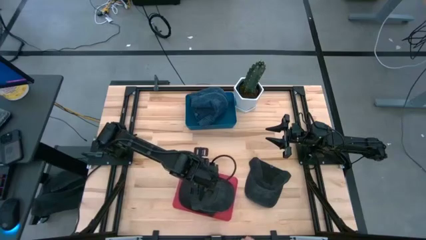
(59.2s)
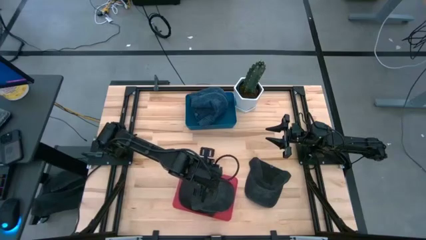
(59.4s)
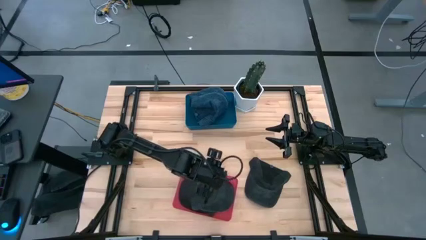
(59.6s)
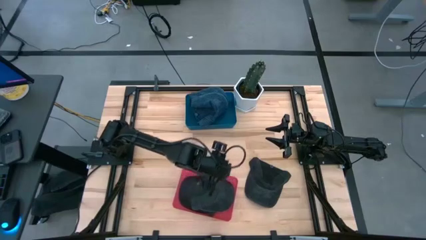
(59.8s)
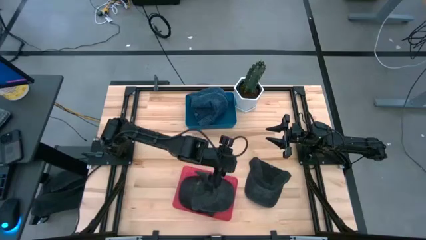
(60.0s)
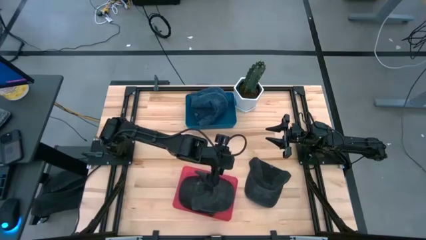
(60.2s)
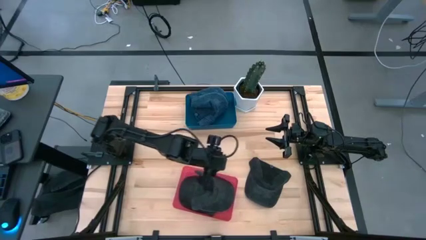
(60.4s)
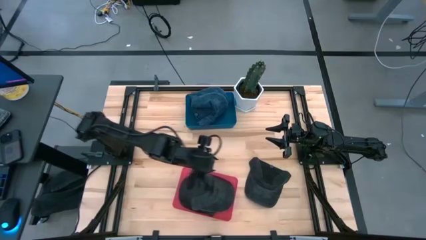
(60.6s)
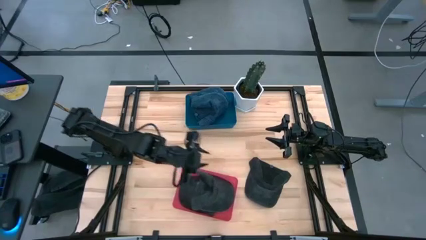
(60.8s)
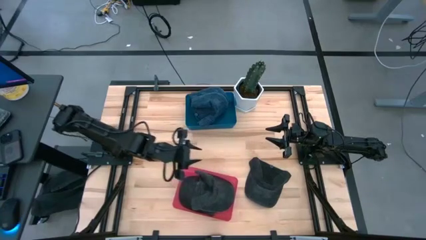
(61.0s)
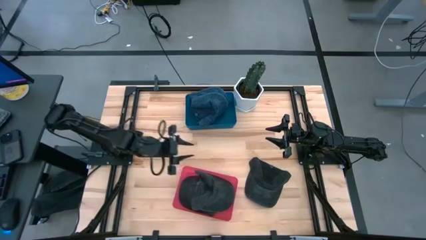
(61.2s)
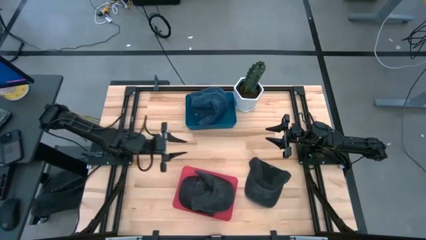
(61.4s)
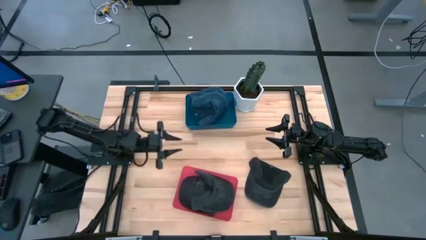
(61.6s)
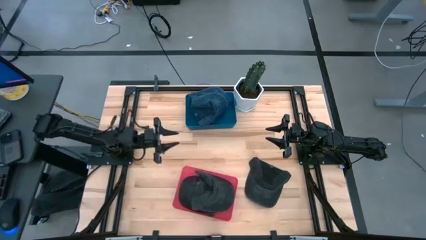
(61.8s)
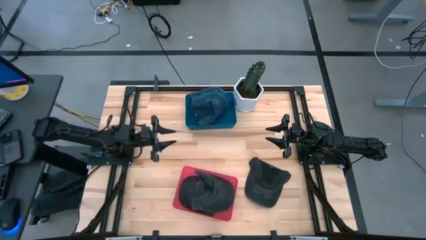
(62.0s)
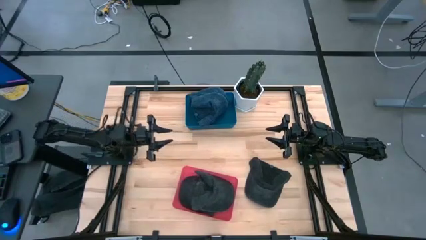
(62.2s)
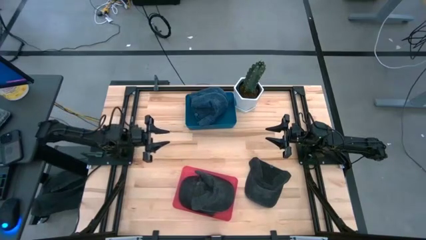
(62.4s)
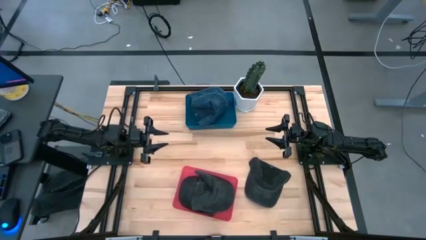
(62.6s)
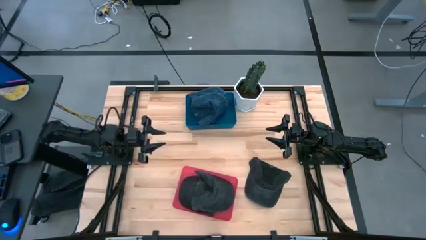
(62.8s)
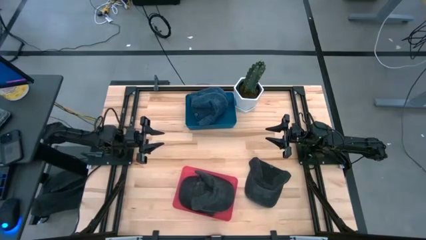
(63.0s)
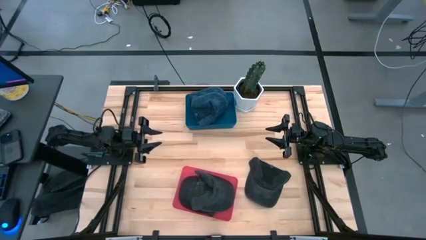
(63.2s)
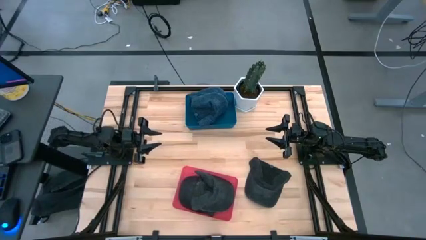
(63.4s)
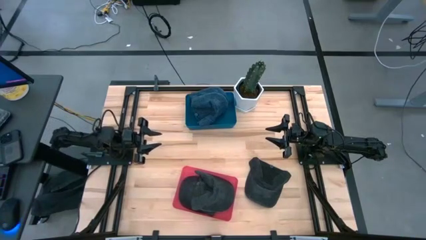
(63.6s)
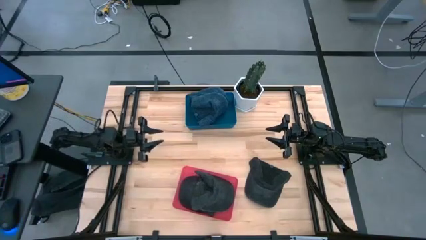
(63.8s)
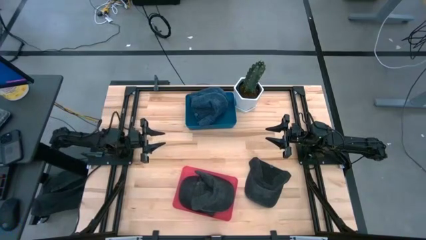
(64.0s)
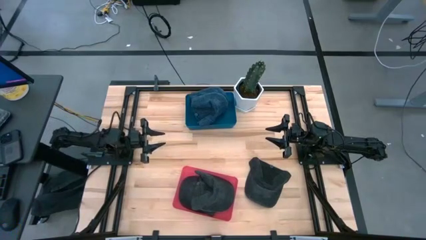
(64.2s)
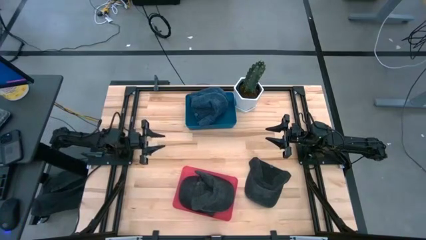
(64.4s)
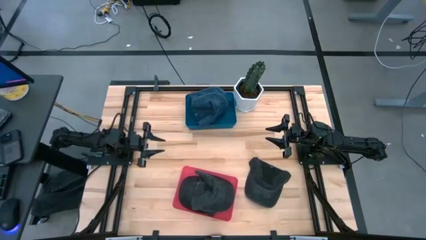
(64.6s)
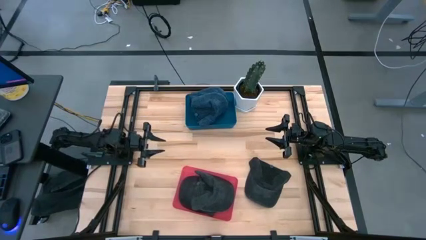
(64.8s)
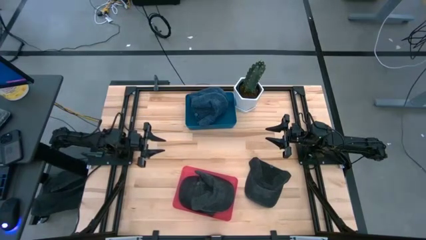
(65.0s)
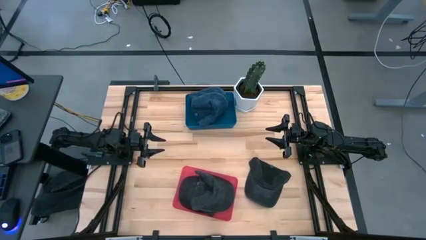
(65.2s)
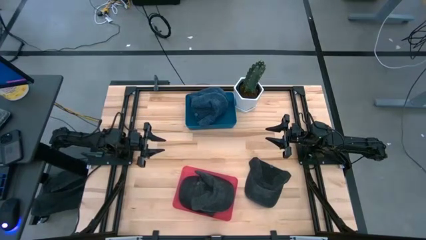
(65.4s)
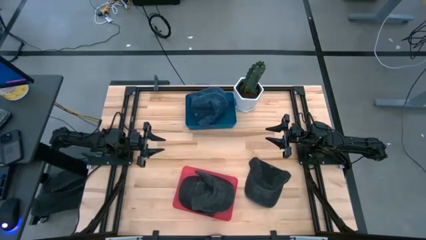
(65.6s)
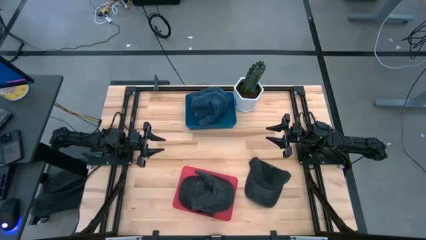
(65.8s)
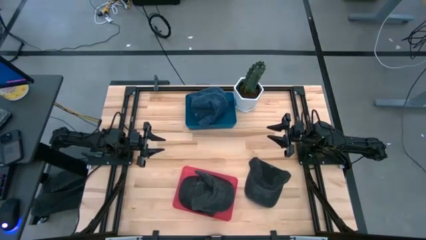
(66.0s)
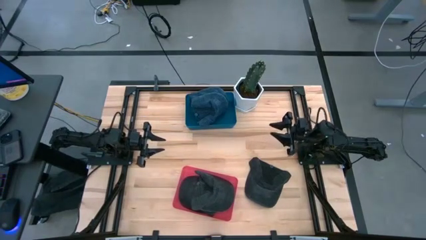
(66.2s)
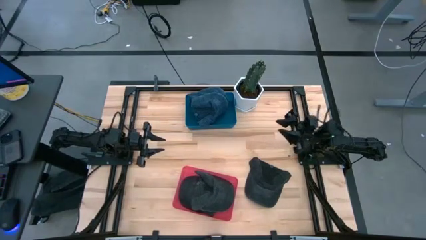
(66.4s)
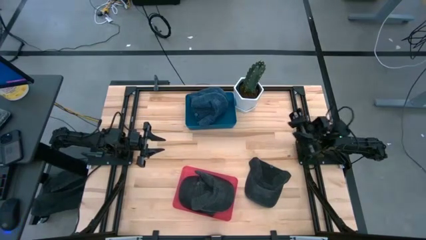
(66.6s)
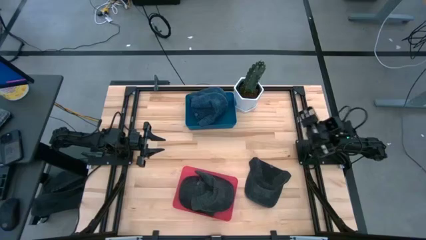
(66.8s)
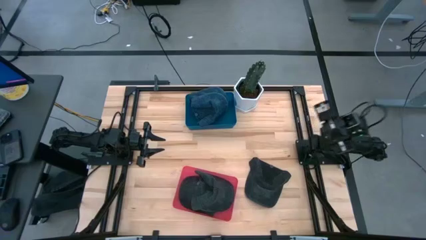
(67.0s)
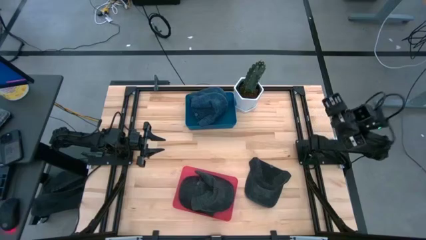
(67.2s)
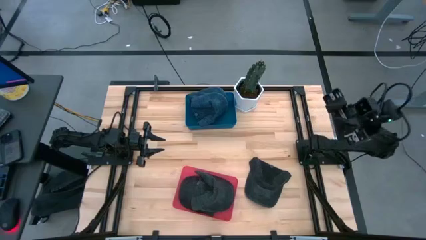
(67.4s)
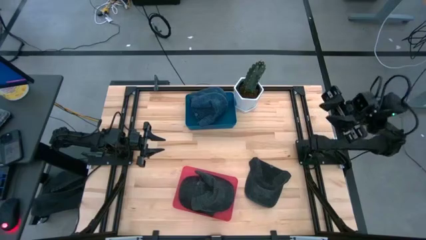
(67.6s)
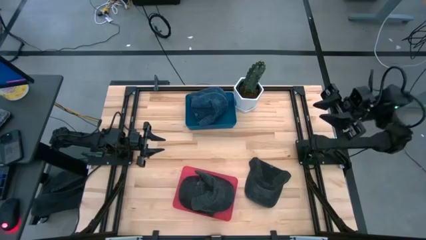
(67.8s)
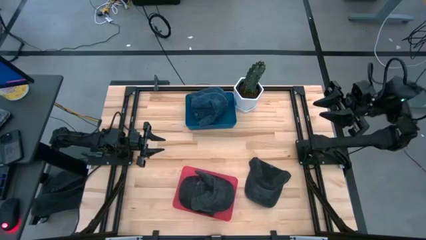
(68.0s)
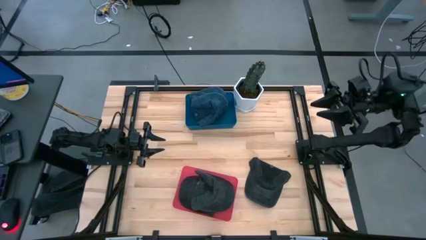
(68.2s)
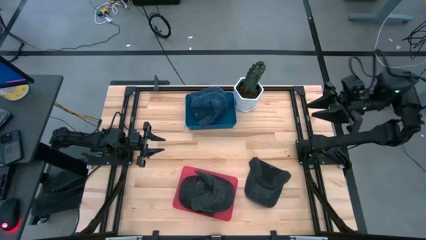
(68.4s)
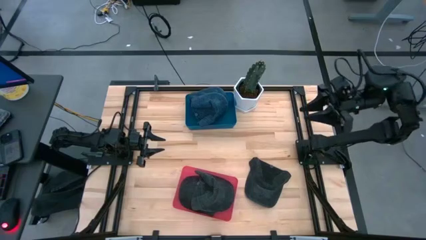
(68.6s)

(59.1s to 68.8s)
Task: Pick & Place hat
Put the black cap into the pink bin

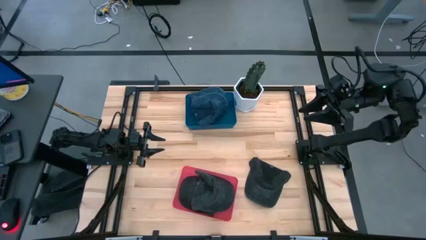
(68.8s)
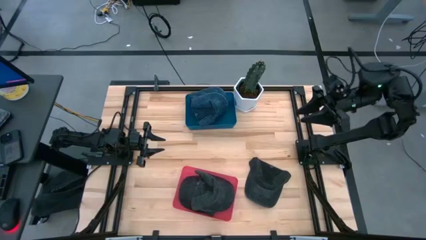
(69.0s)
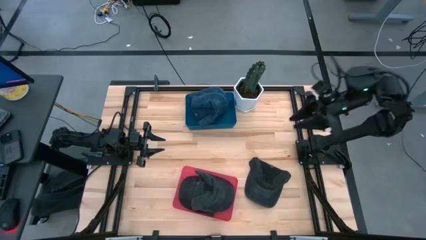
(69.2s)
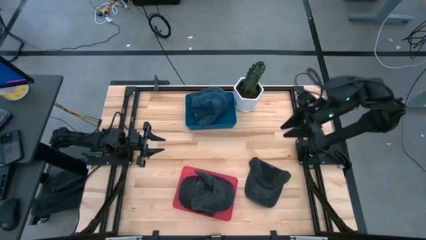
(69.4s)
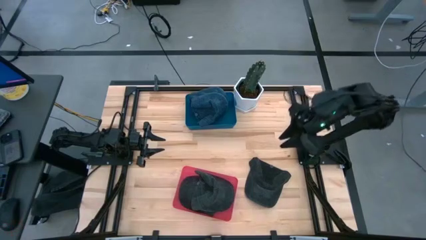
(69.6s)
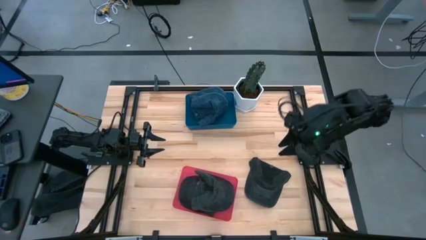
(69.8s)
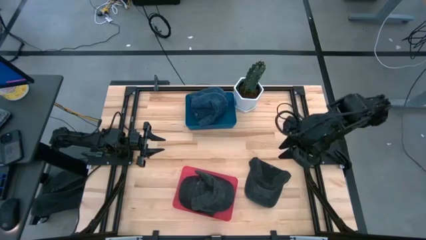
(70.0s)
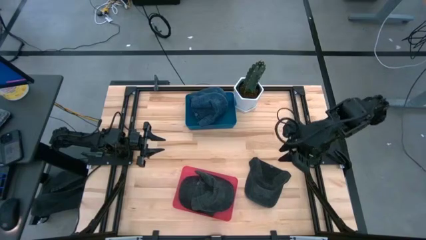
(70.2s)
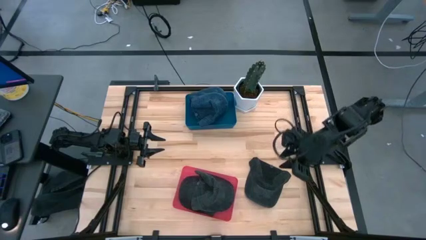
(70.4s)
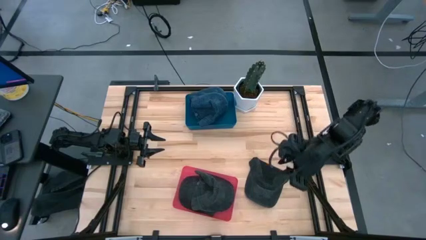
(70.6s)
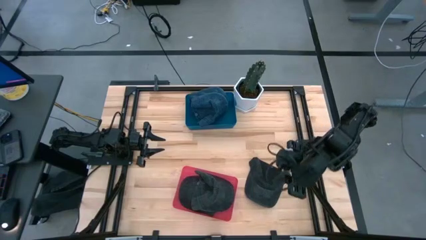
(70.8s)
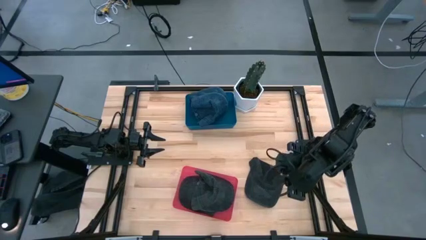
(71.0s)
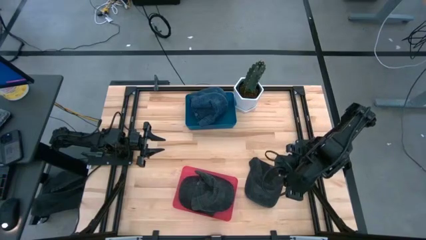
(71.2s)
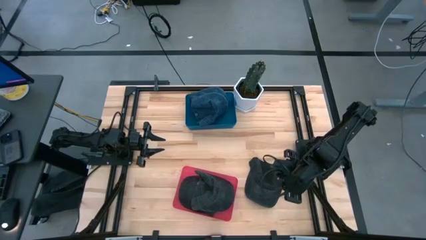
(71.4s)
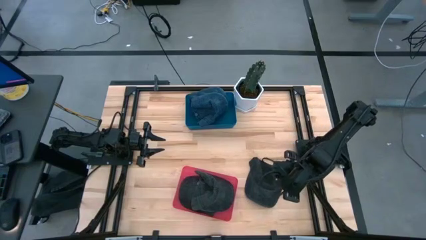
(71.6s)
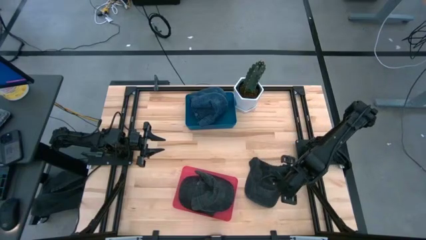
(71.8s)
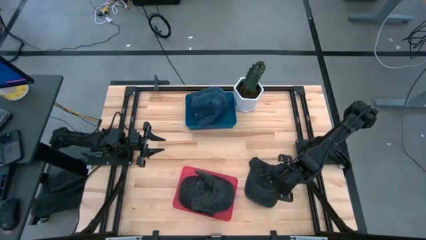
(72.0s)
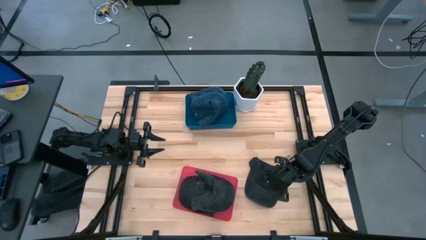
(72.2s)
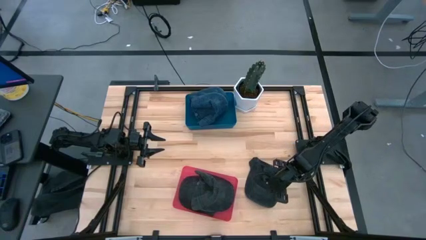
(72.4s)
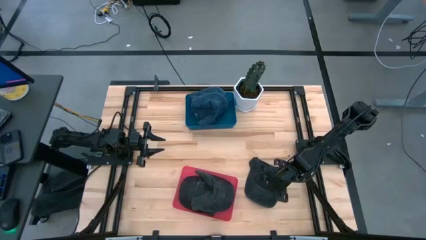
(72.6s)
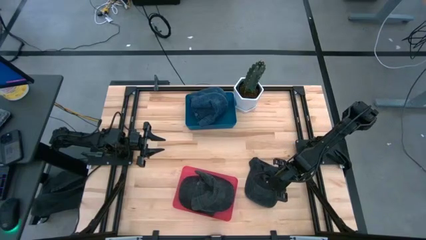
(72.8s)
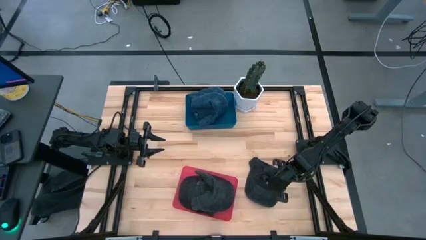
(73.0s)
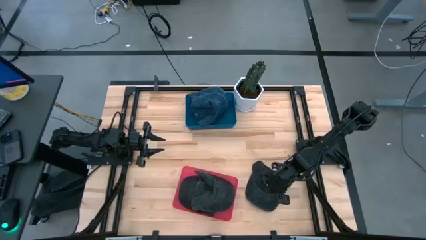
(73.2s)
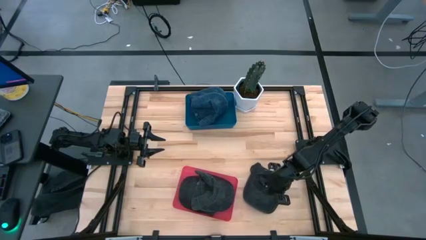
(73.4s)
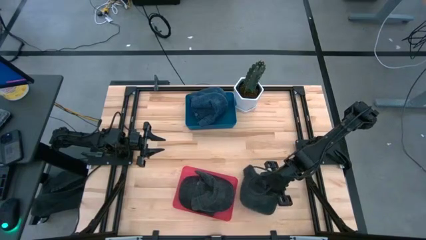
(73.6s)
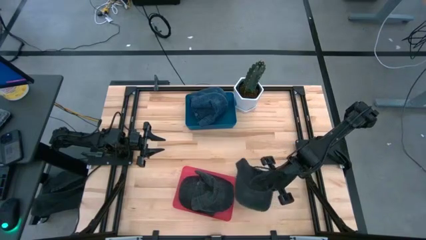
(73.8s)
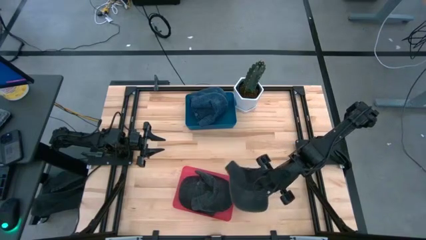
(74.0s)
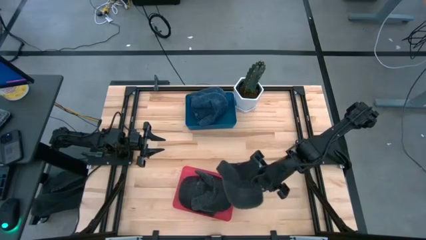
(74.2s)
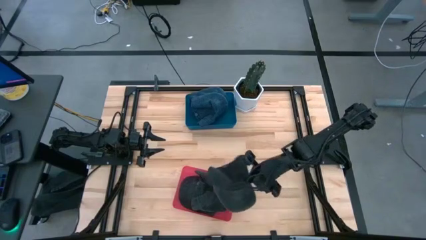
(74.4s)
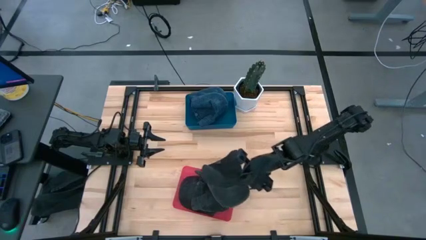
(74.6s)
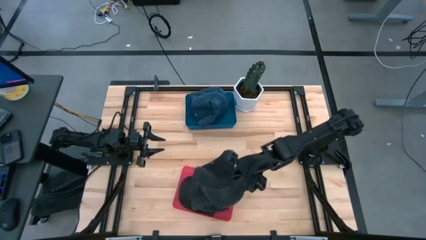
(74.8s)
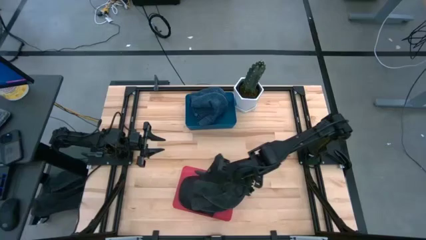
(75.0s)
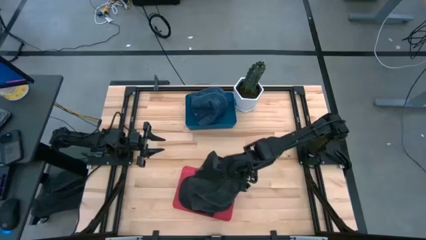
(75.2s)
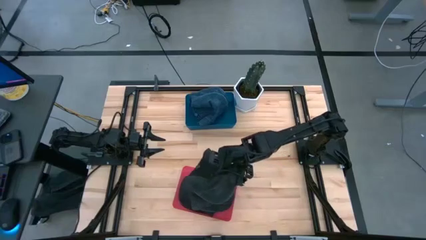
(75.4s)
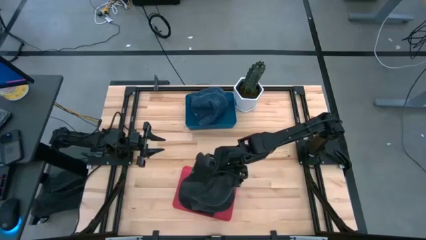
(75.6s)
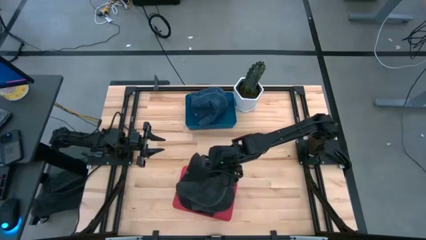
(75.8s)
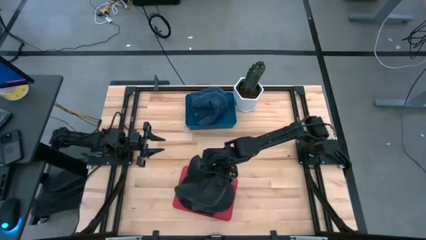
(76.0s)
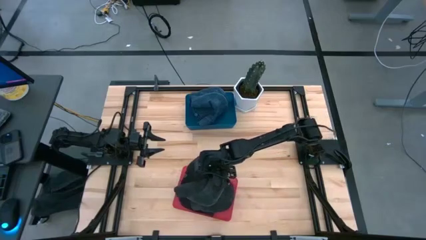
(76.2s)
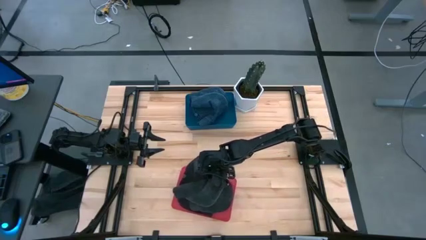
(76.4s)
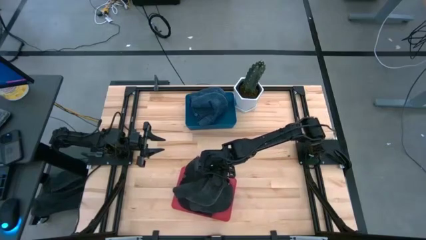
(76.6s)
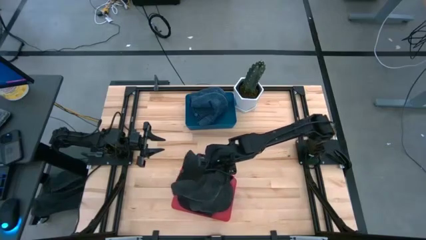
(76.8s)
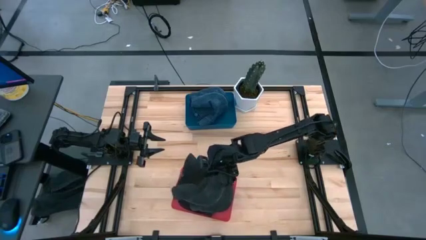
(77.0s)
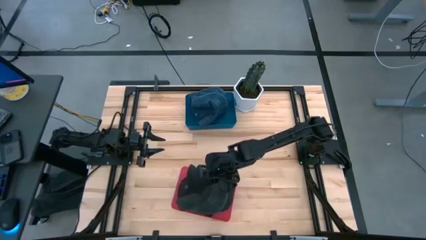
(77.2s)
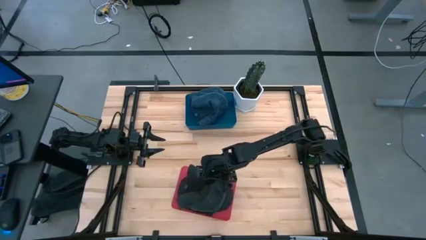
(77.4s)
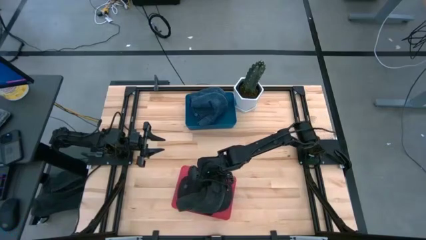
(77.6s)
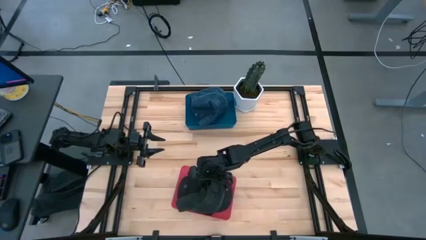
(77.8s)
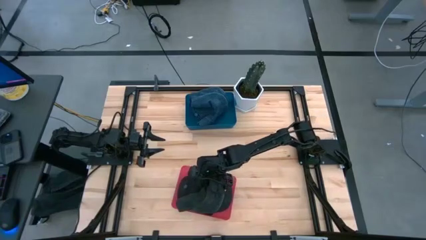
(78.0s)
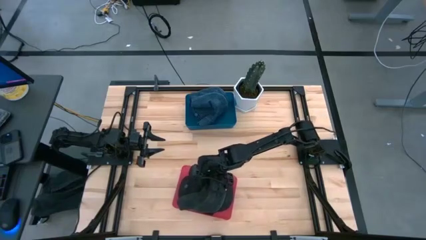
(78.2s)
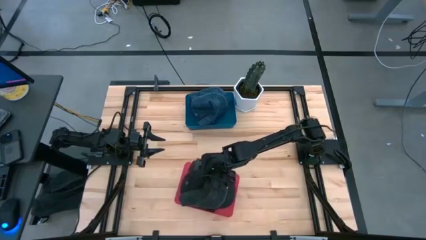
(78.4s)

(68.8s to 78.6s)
Put the black cap into the pink bin
